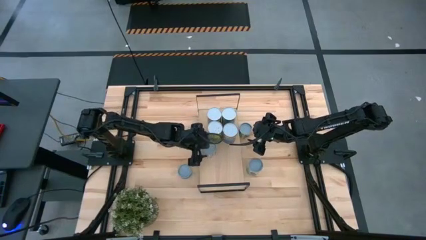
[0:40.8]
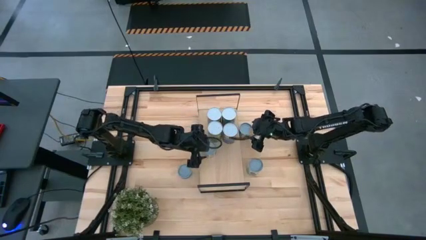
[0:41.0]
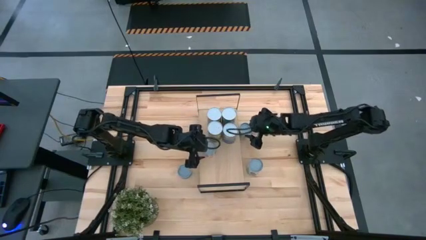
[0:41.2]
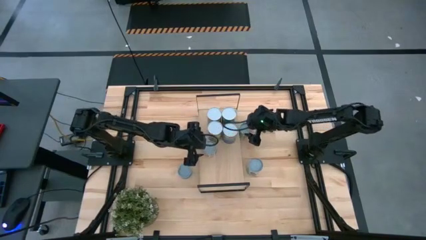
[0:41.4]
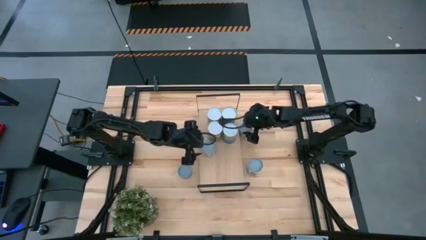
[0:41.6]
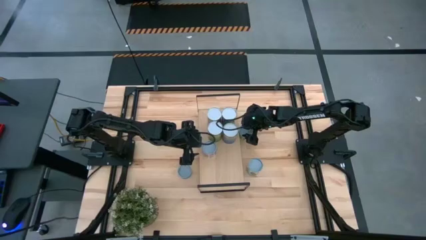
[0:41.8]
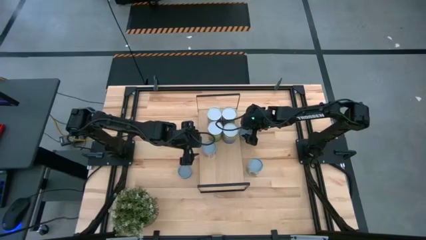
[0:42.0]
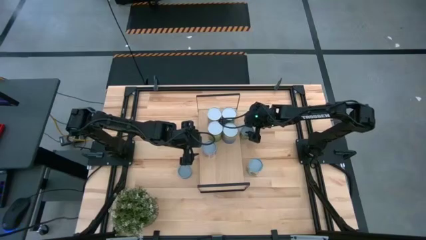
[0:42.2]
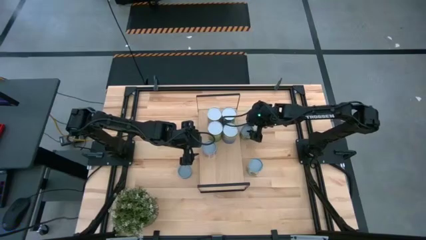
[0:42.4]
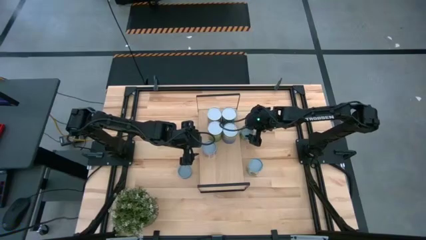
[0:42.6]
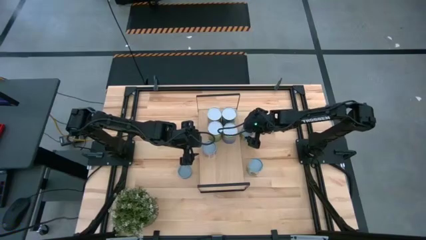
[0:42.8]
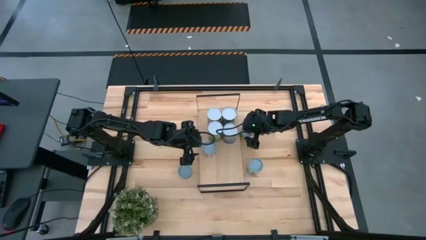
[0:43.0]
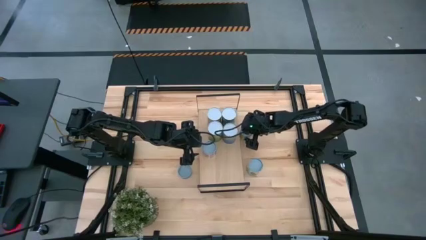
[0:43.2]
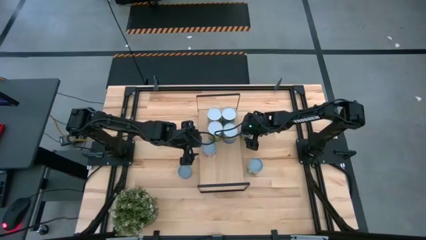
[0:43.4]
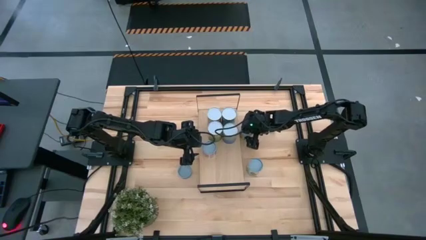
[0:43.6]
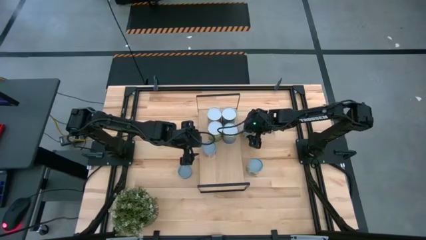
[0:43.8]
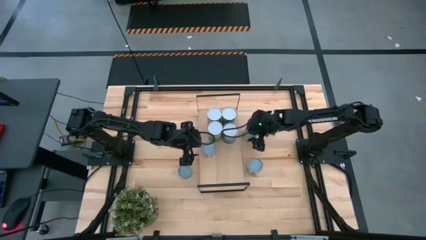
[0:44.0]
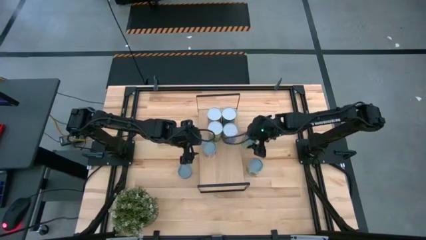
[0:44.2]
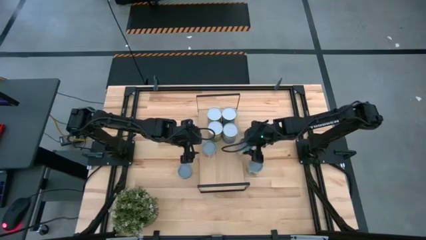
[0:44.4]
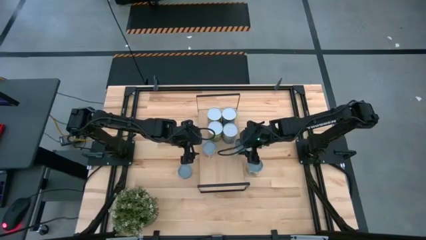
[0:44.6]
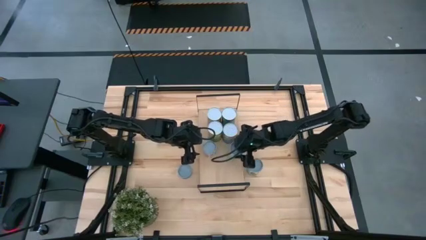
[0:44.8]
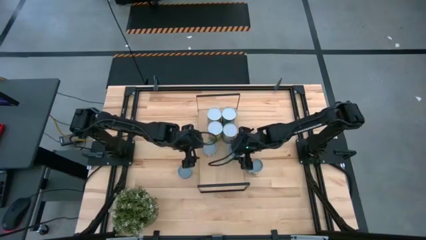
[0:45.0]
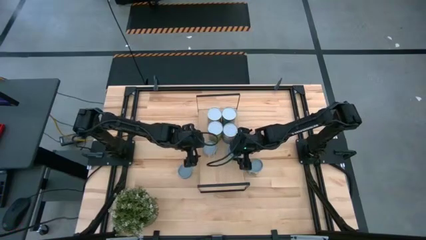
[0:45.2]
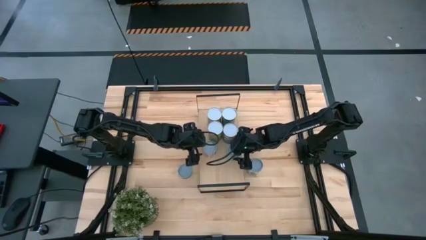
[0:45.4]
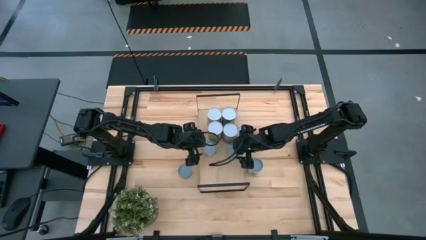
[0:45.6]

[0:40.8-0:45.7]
Task: Pick and place cans onto a shelf
Put the canned green peas on the shelf

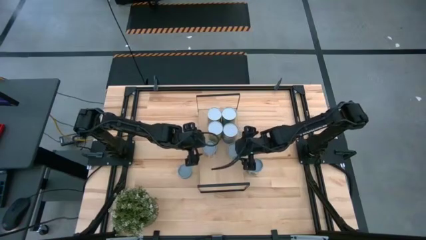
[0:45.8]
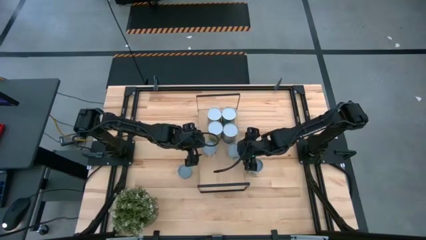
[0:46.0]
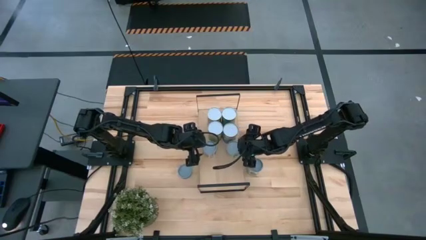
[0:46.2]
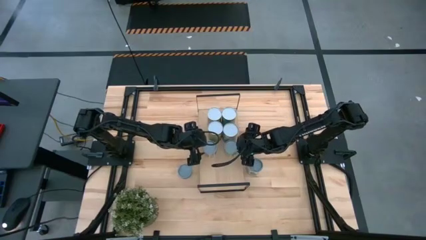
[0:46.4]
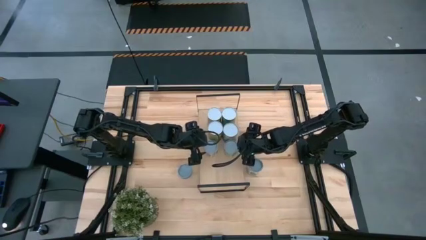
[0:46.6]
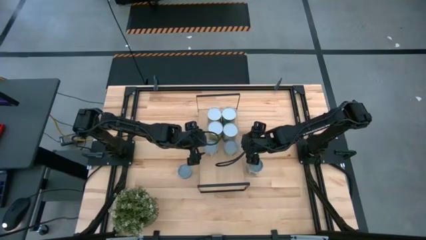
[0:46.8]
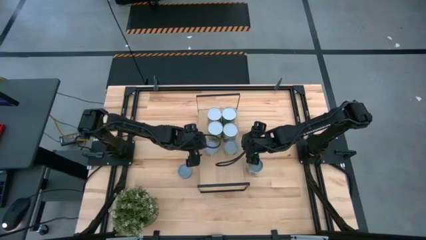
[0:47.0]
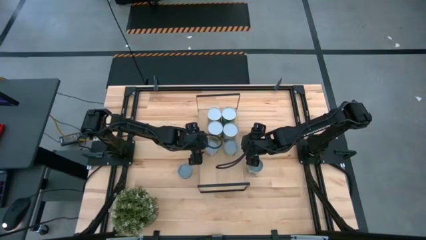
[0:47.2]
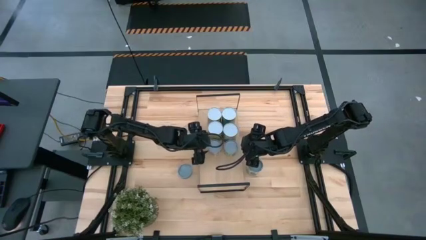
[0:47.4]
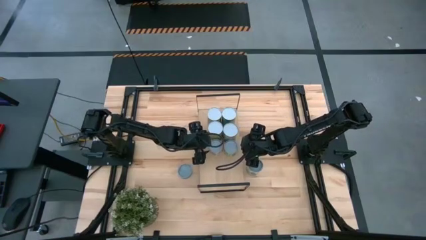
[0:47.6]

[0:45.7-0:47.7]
Adjust the cans on the shelf

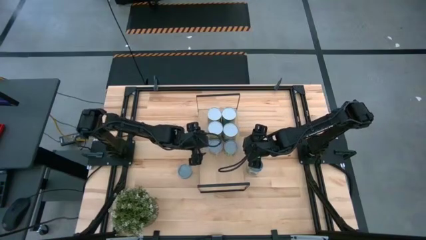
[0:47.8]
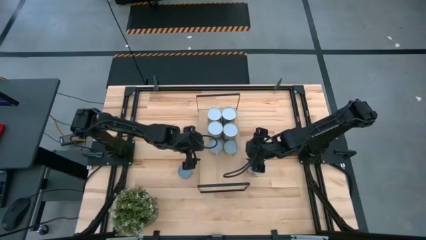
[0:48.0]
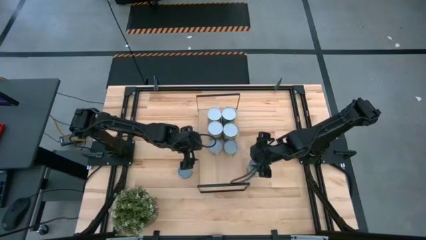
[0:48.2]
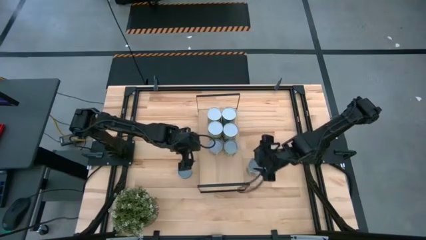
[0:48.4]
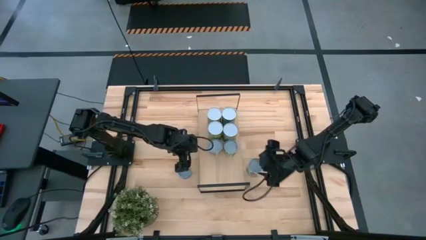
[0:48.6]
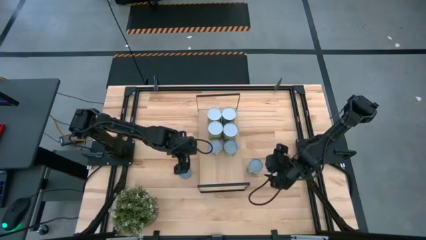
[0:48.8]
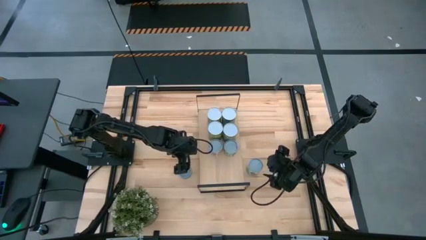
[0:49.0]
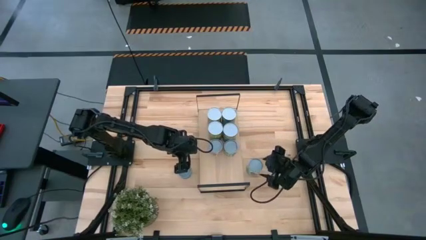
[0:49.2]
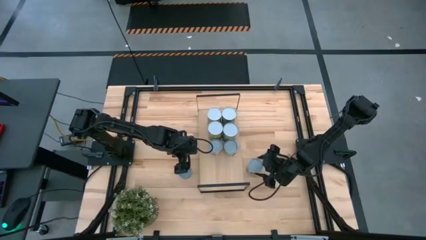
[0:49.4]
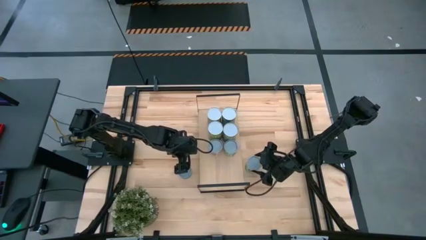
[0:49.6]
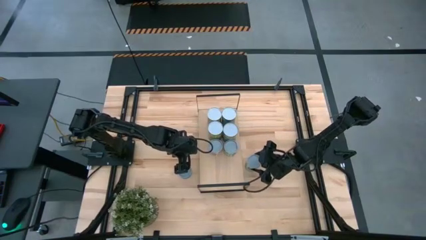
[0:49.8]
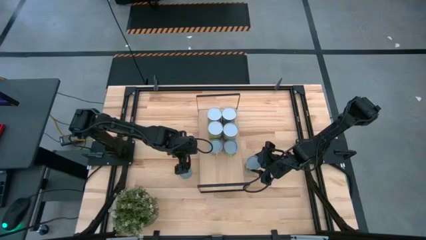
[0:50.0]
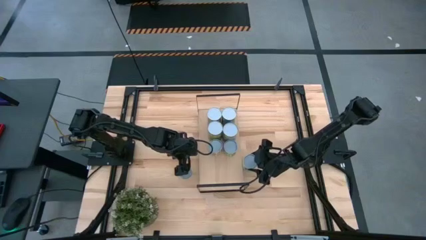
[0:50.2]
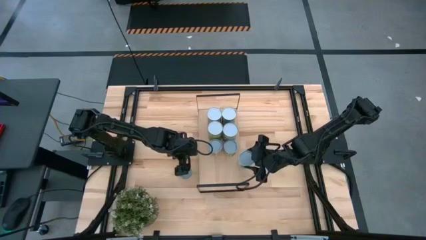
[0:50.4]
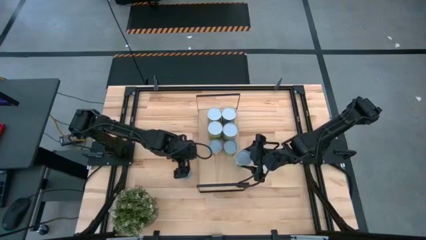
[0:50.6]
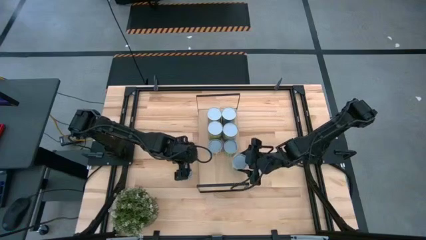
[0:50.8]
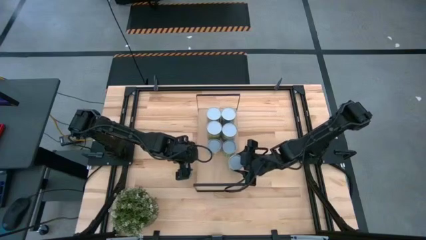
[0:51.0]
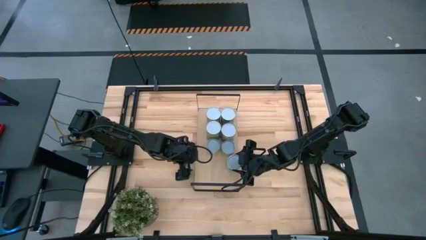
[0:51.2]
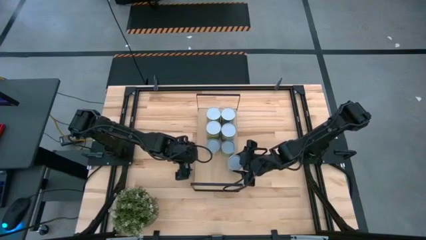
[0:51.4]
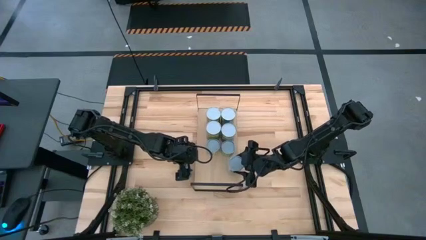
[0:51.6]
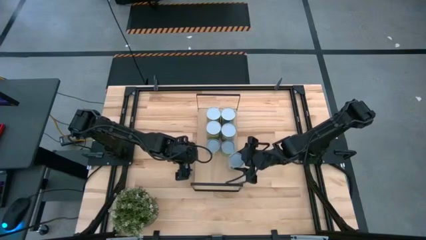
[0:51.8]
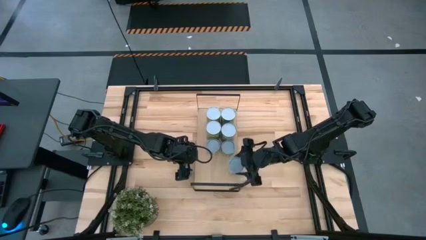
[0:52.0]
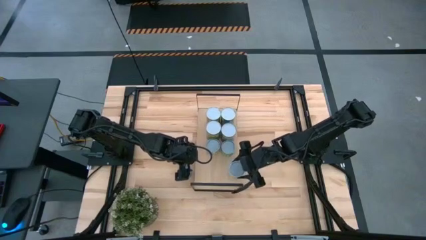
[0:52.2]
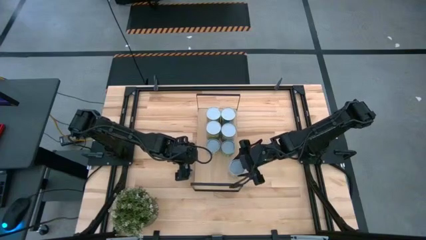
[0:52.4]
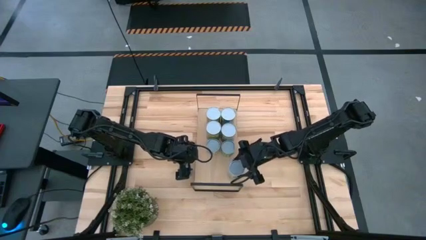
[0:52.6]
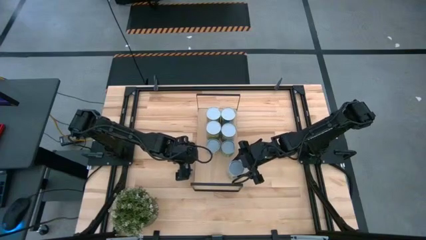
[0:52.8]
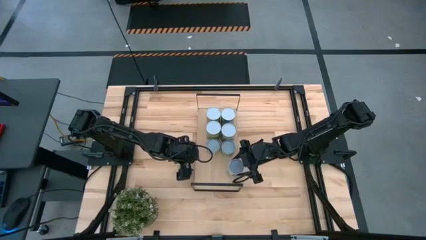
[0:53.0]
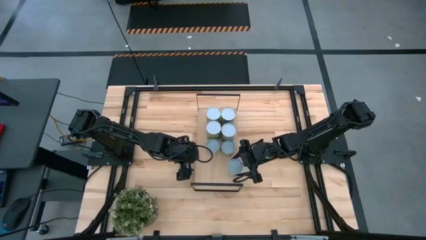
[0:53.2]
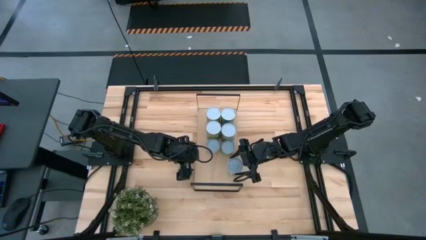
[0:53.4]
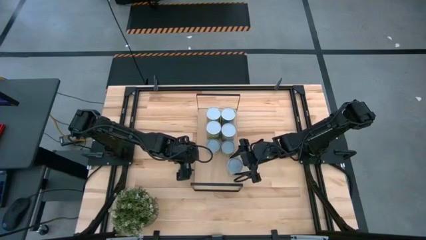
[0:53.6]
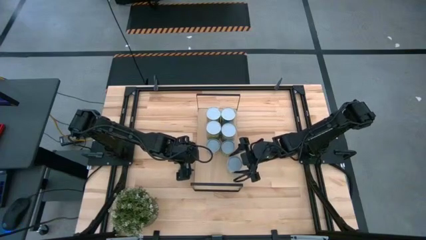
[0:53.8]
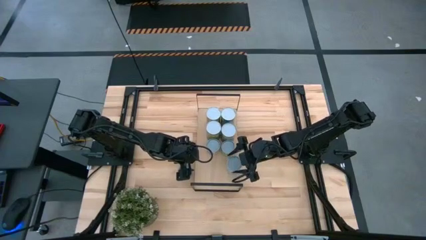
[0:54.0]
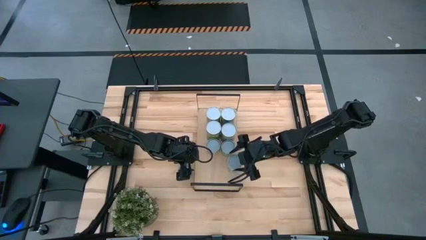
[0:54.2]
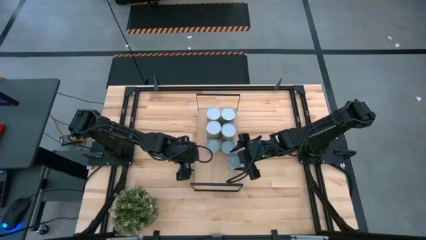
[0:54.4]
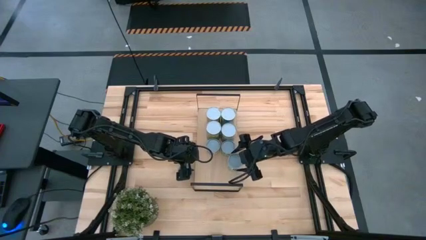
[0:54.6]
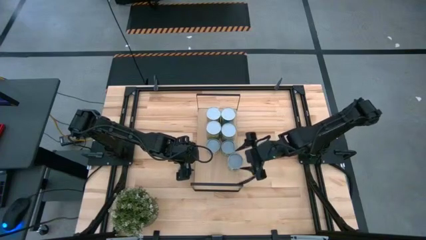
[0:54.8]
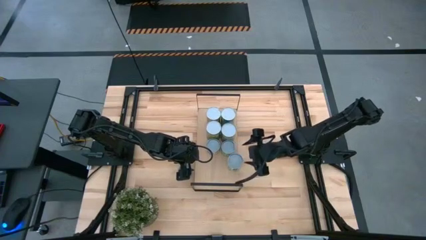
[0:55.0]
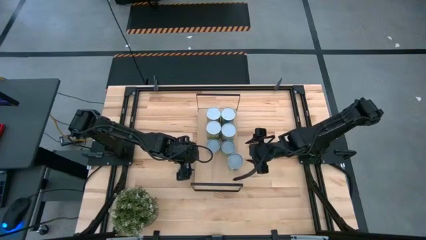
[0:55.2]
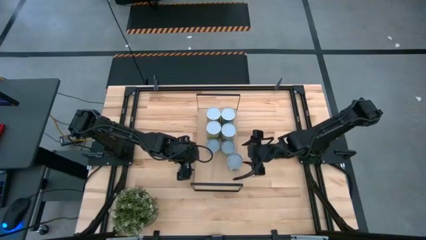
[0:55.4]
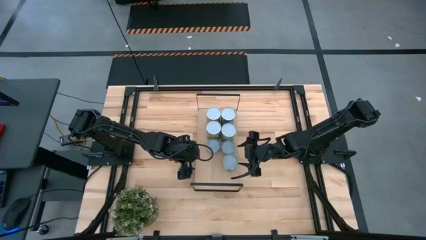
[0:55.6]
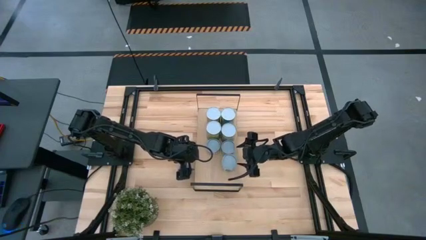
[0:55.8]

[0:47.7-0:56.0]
Put the canned mix vegetables on the shelf
